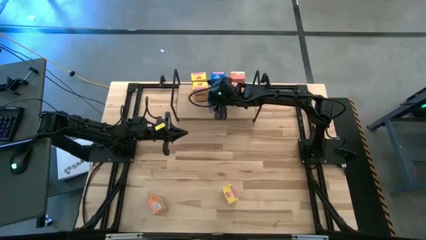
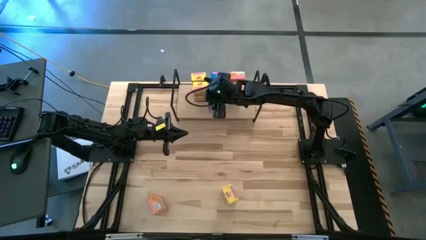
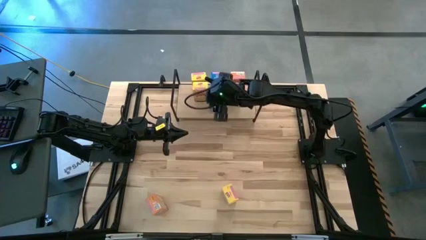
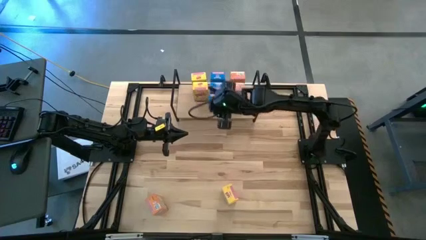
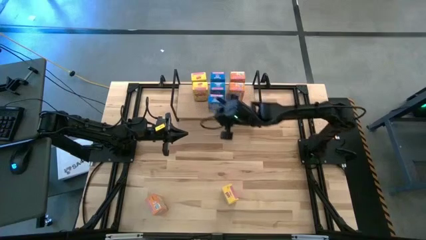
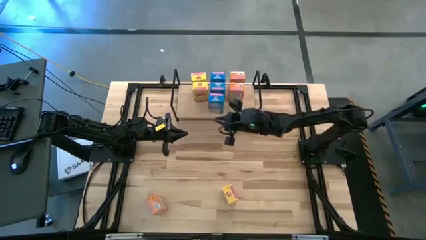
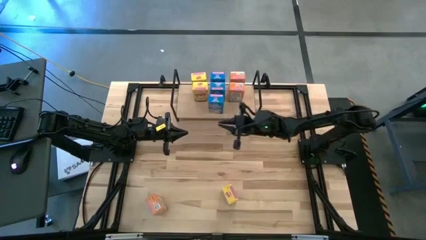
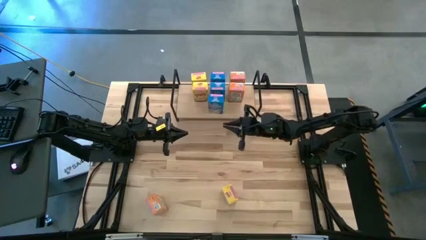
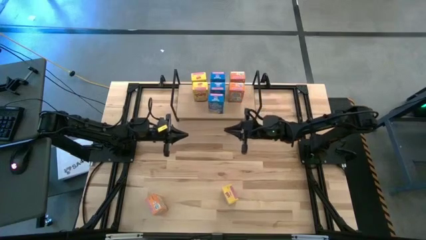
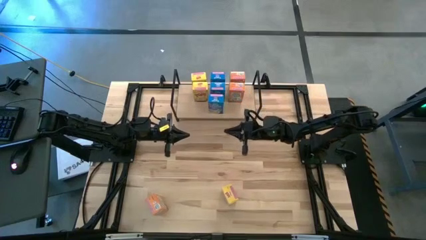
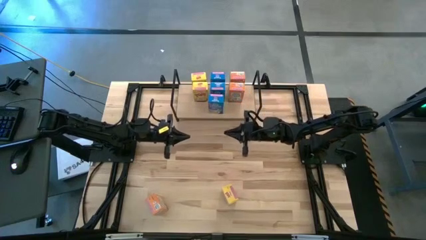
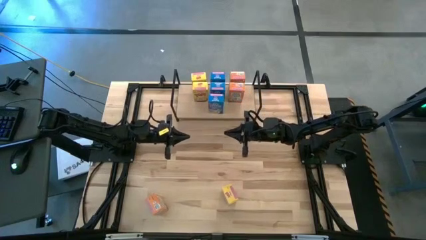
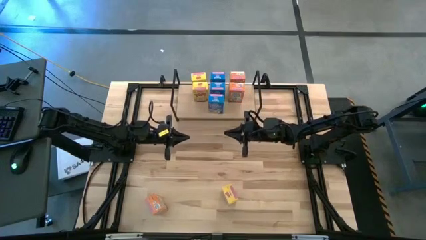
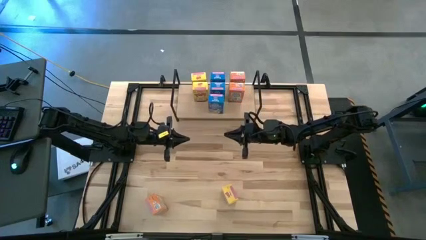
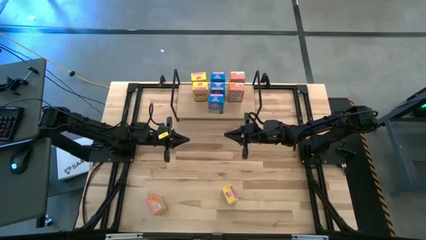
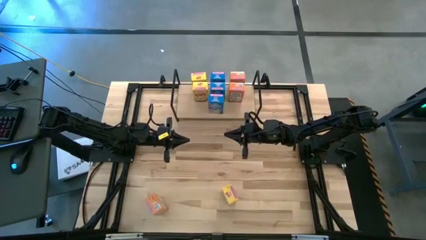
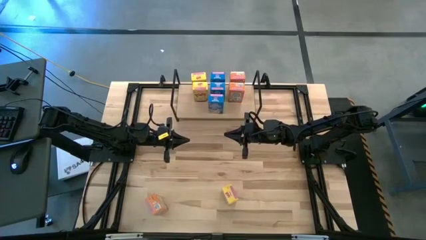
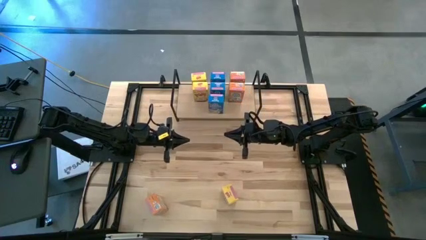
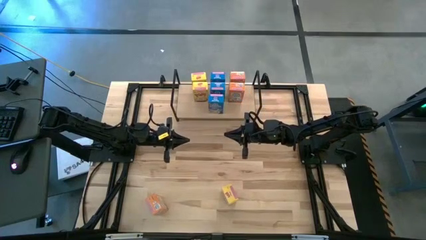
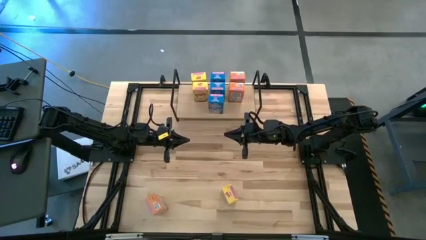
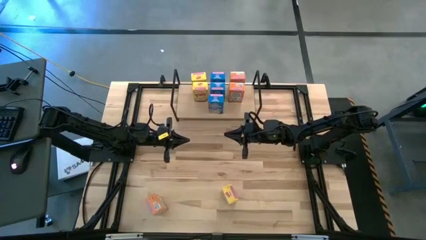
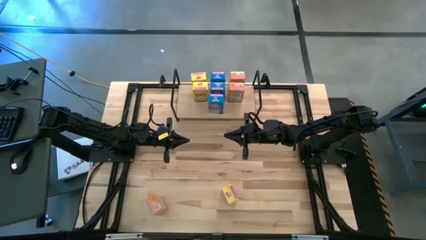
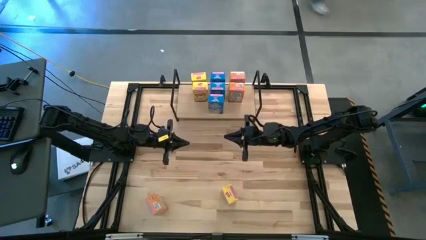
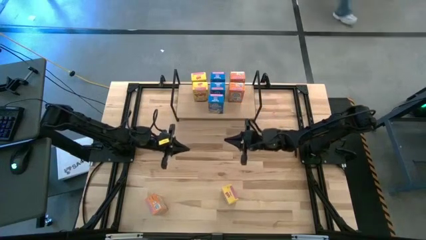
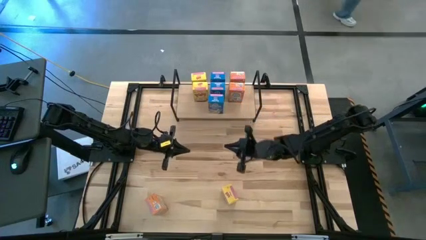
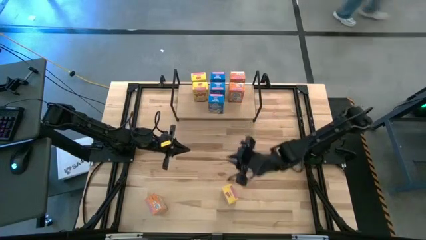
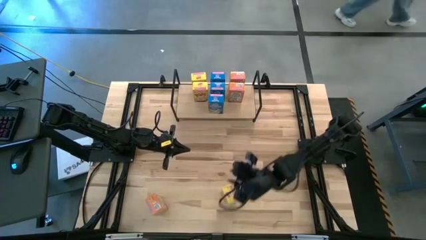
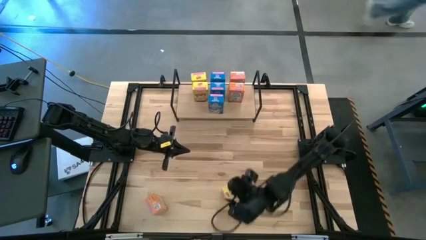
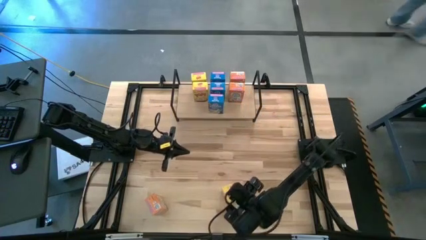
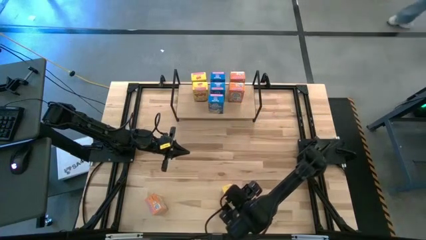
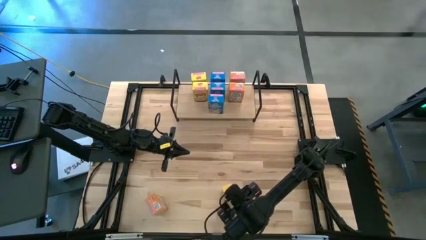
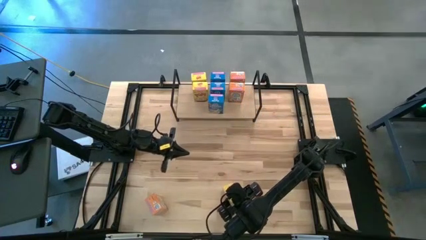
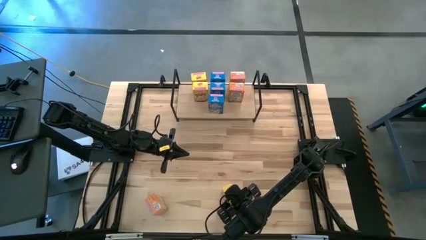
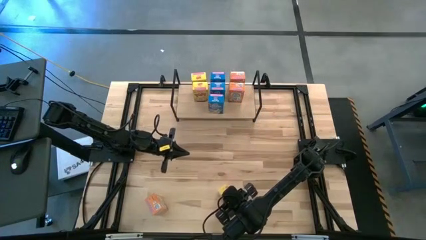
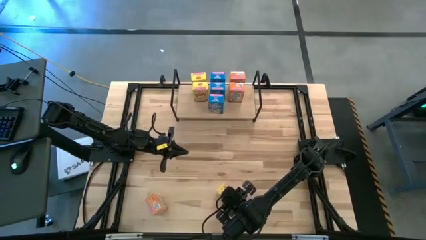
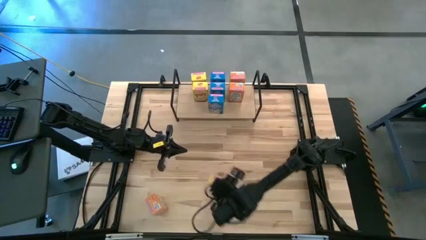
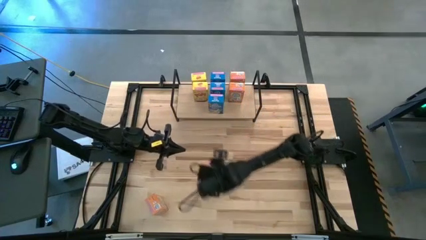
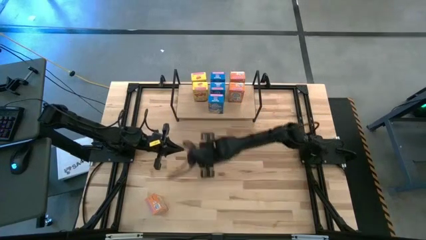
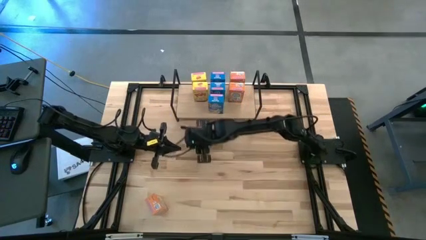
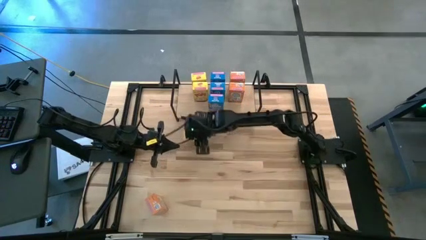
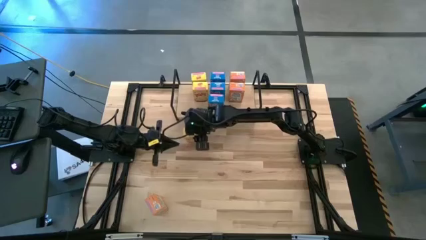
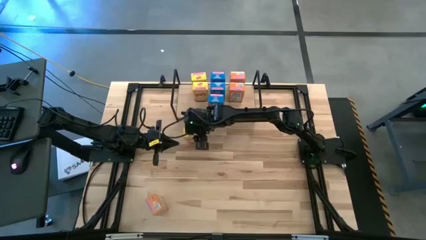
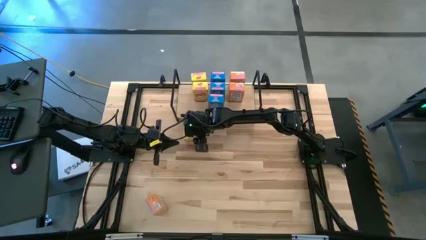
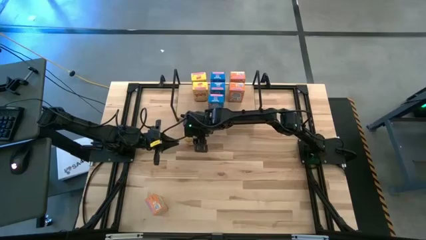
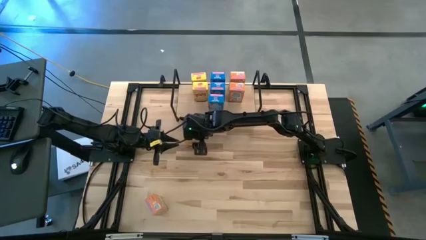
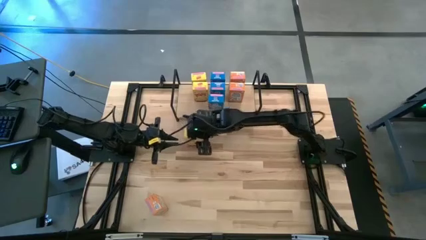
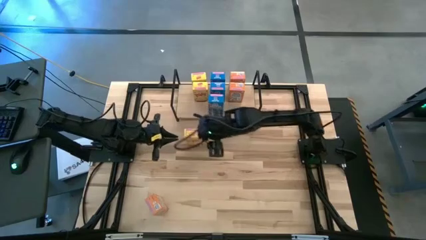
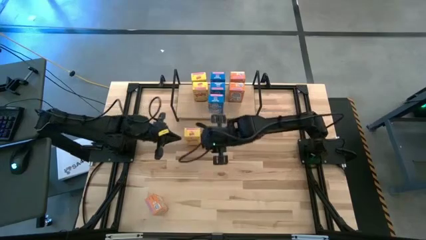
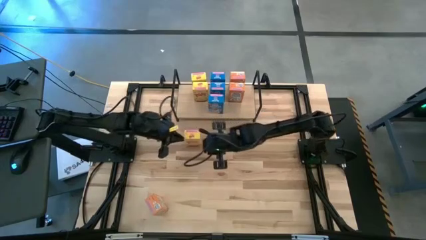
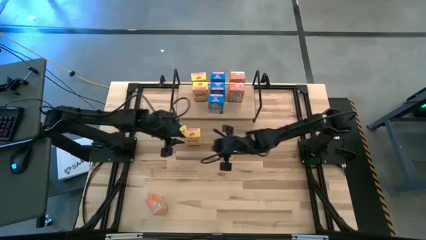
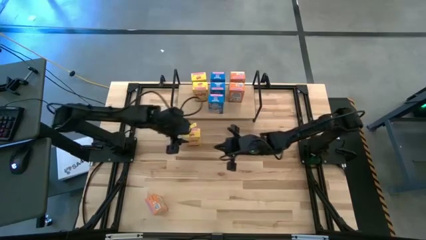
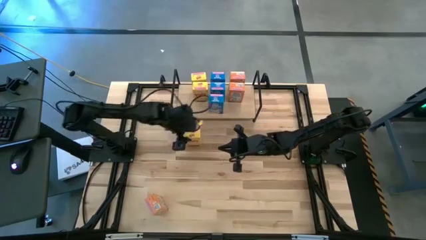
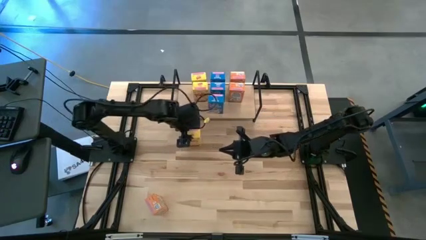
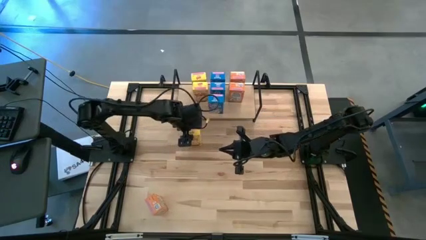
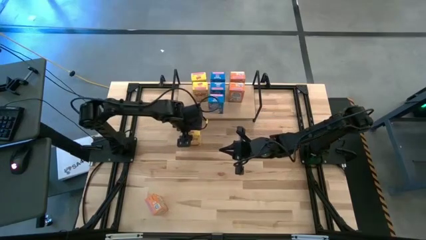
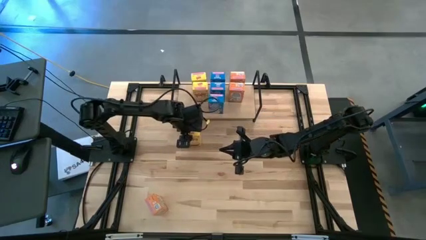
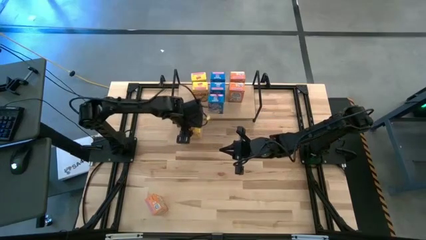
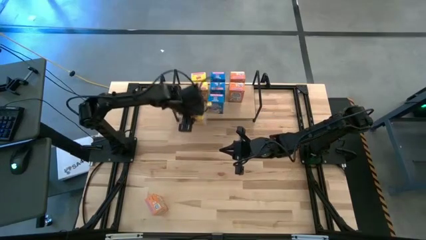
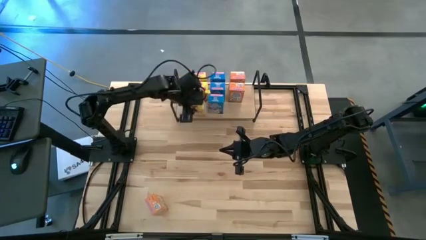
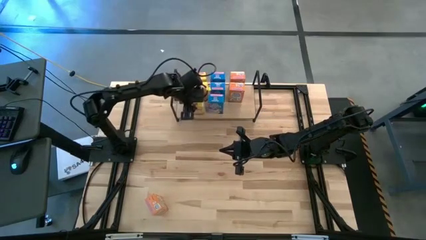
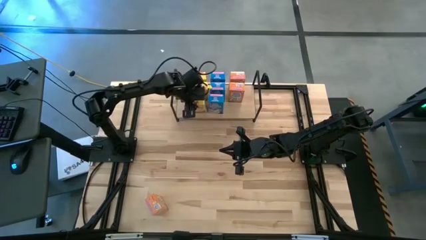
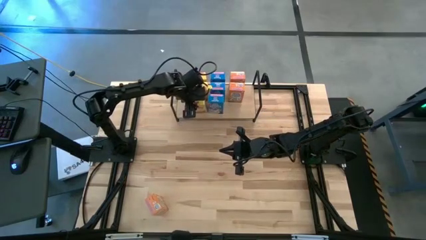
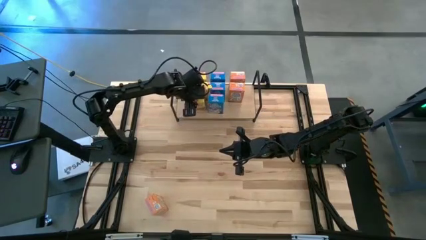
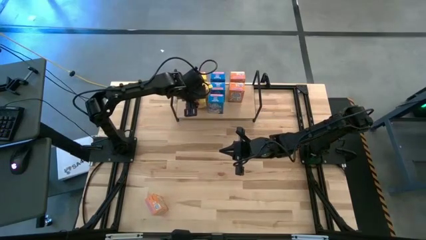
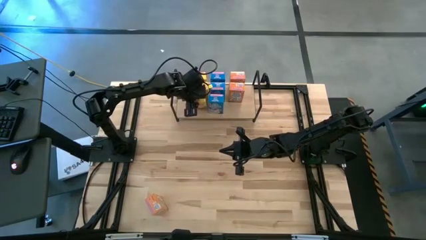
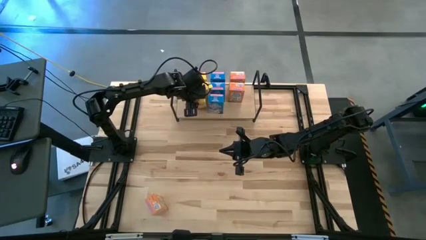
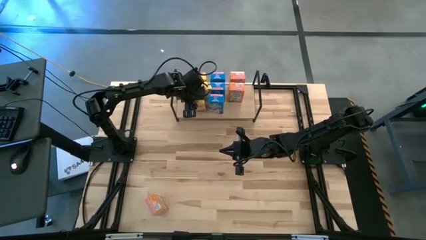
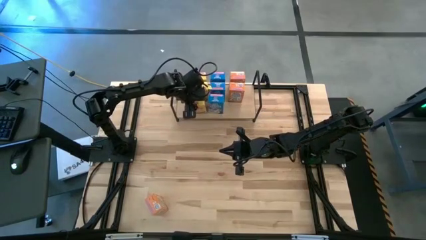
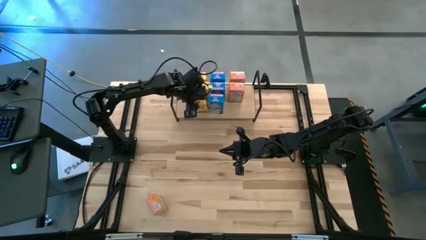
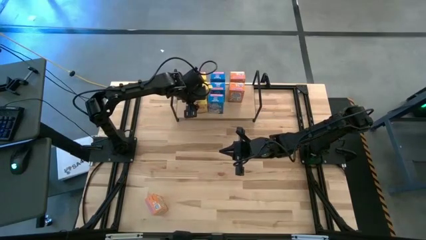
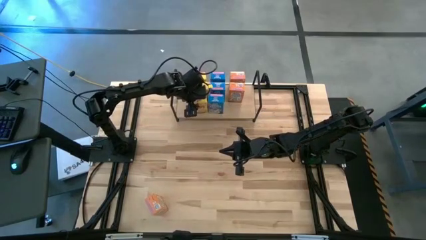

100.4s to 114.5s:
Task: Stack cereal on shelf
Put the yellow cereal box on the shelf aligned with the other yellow cereal boxes
